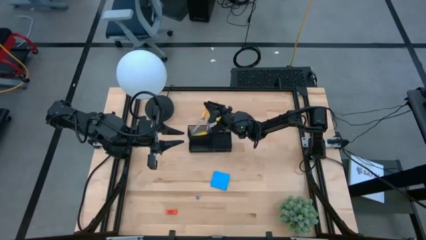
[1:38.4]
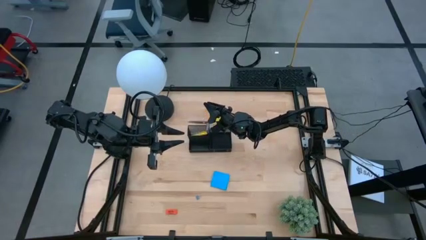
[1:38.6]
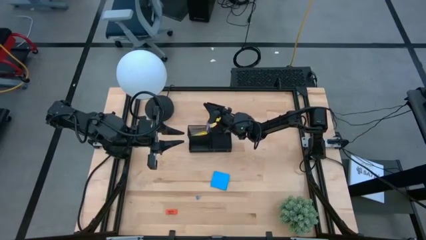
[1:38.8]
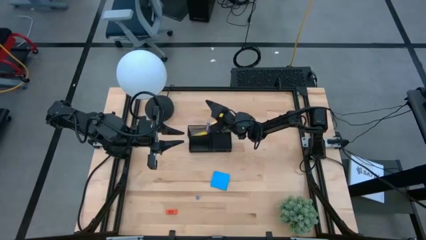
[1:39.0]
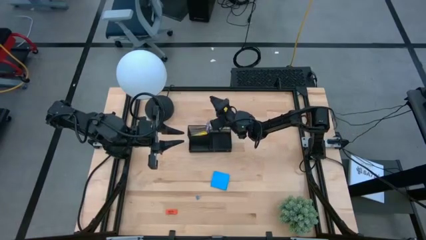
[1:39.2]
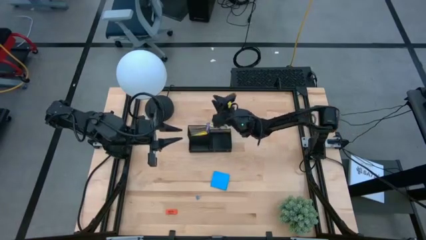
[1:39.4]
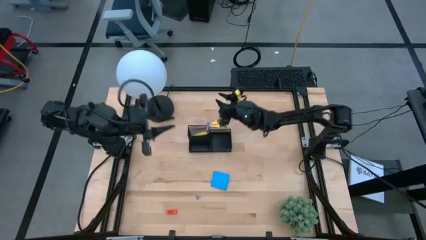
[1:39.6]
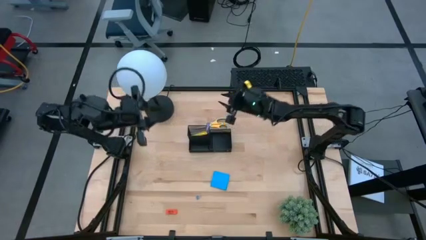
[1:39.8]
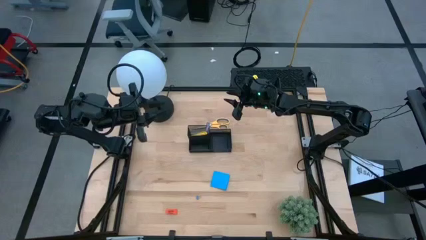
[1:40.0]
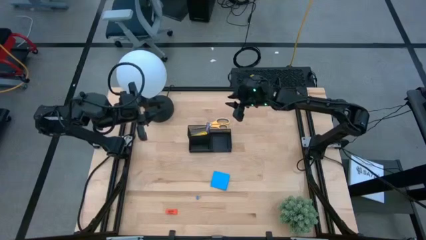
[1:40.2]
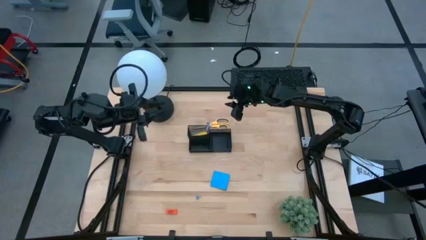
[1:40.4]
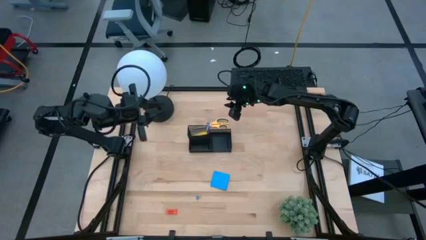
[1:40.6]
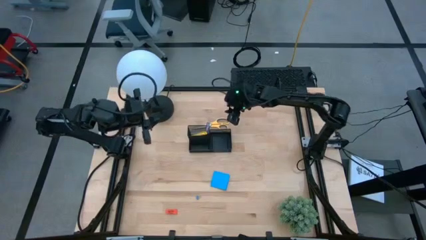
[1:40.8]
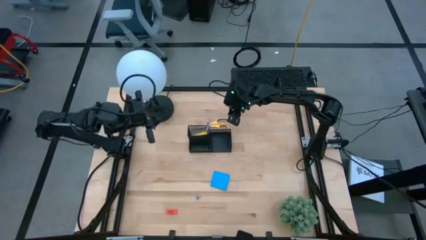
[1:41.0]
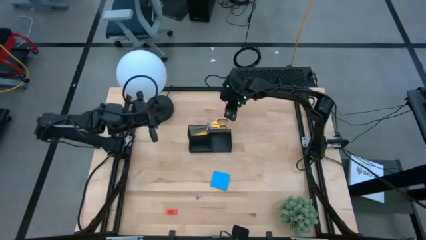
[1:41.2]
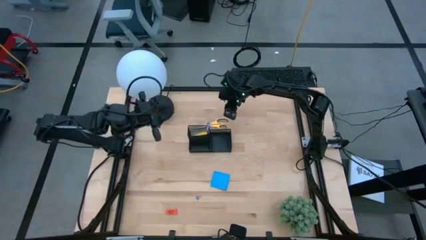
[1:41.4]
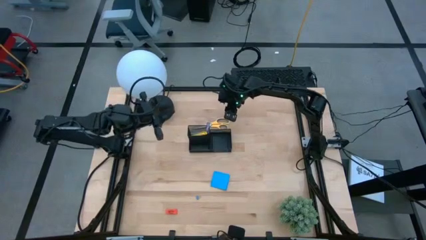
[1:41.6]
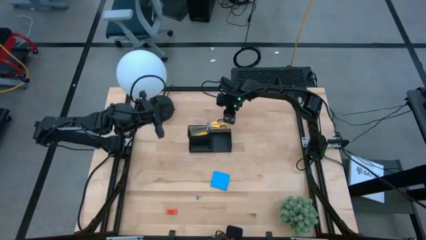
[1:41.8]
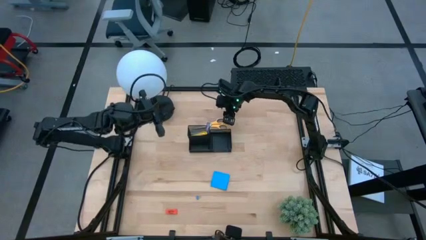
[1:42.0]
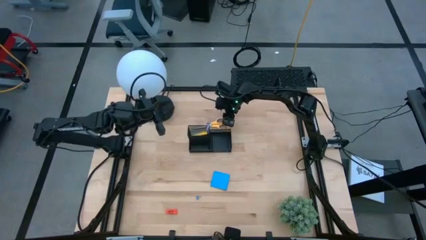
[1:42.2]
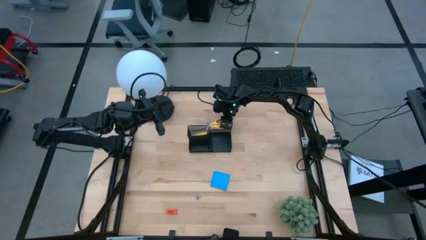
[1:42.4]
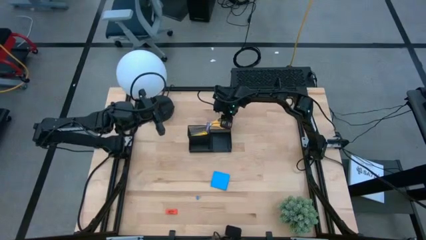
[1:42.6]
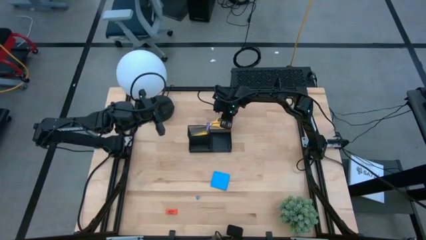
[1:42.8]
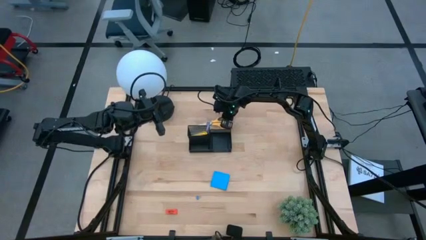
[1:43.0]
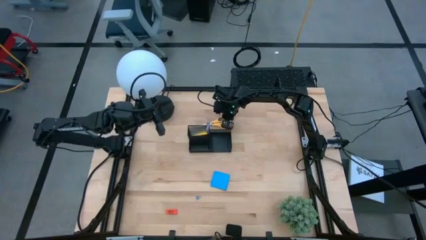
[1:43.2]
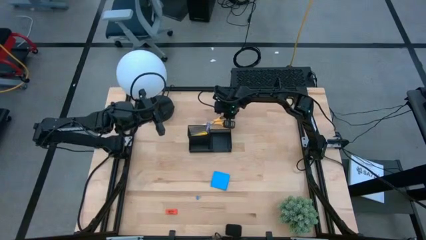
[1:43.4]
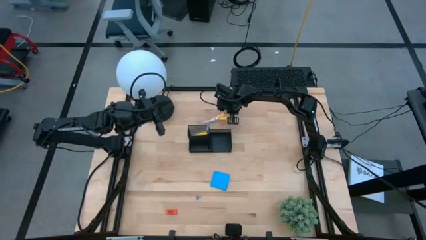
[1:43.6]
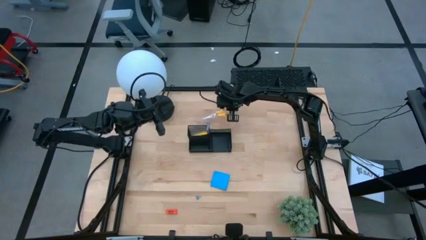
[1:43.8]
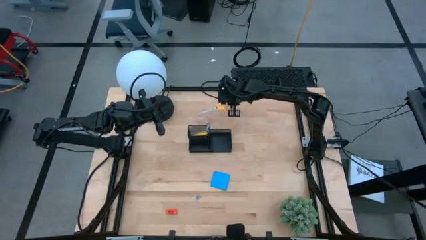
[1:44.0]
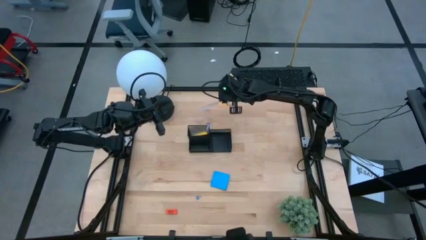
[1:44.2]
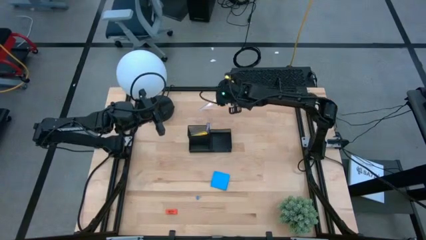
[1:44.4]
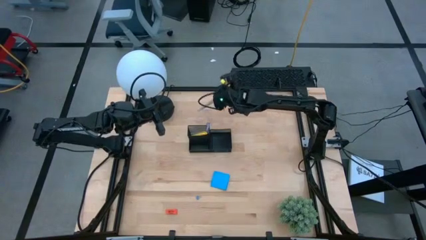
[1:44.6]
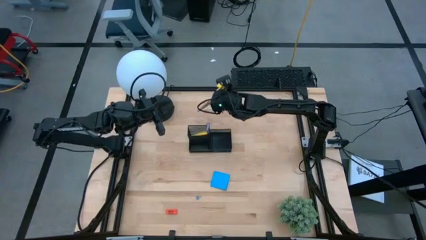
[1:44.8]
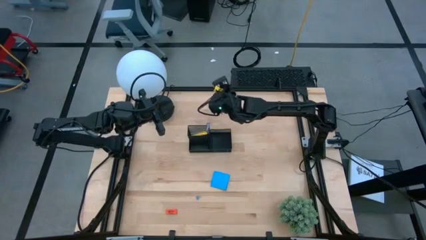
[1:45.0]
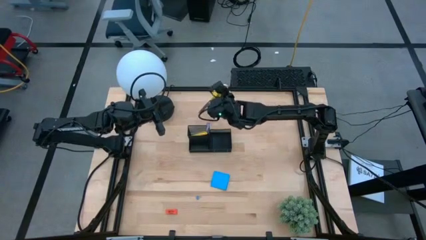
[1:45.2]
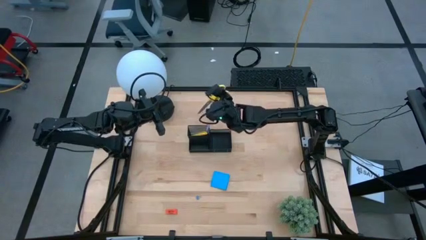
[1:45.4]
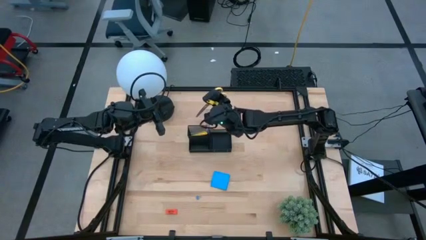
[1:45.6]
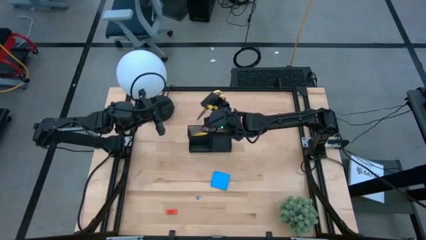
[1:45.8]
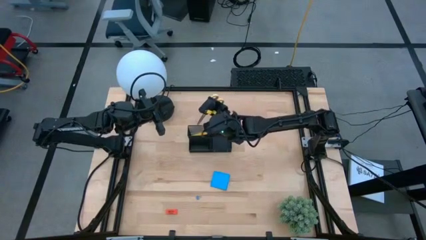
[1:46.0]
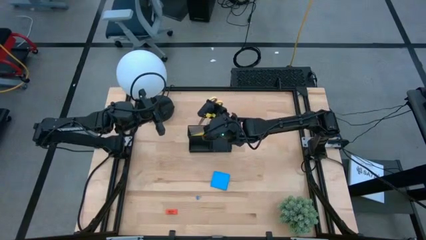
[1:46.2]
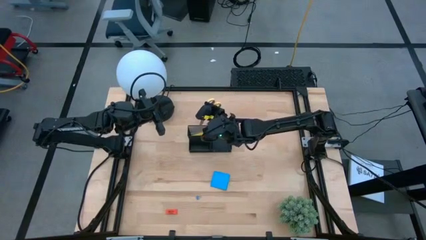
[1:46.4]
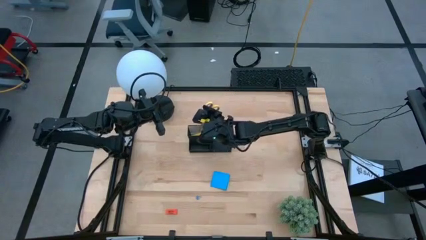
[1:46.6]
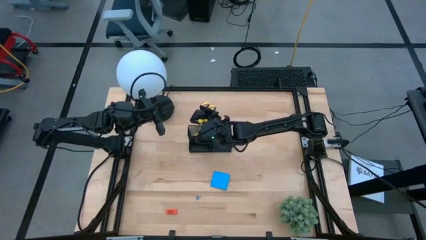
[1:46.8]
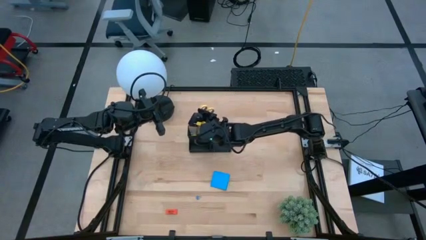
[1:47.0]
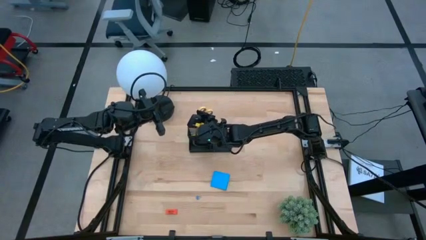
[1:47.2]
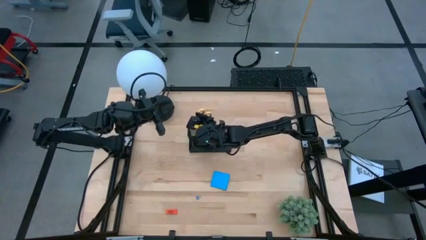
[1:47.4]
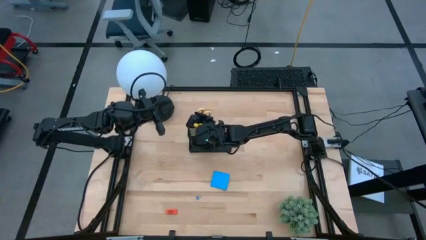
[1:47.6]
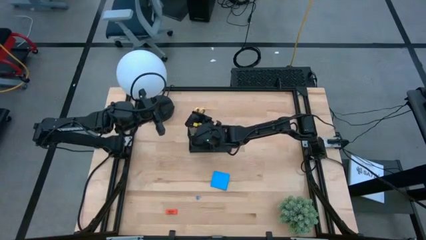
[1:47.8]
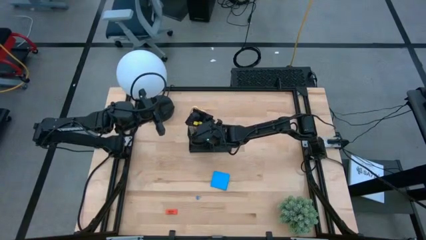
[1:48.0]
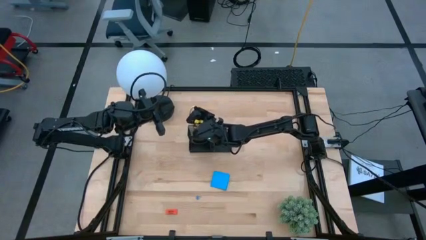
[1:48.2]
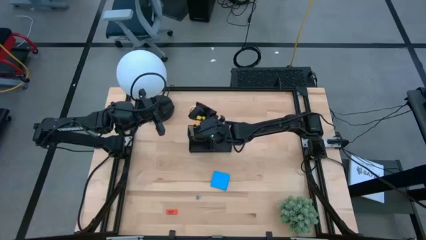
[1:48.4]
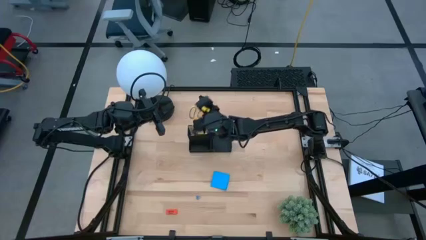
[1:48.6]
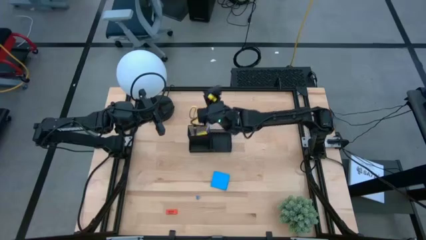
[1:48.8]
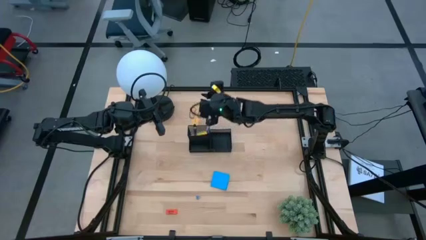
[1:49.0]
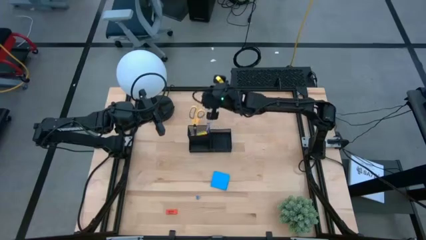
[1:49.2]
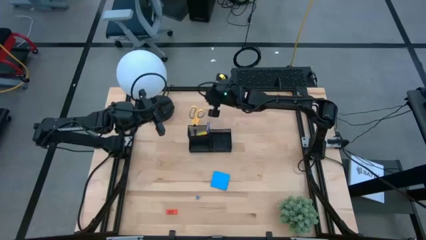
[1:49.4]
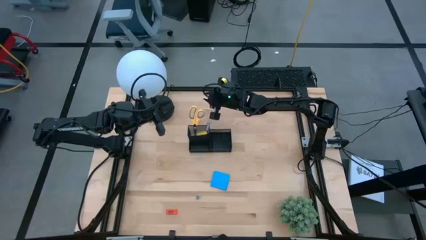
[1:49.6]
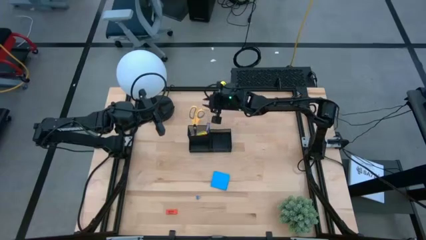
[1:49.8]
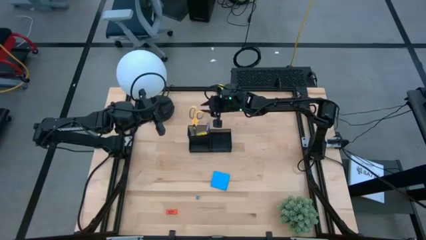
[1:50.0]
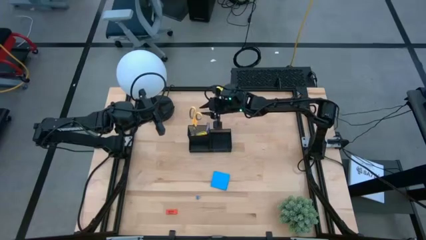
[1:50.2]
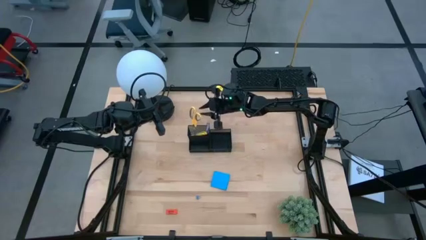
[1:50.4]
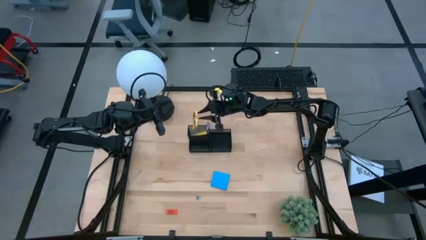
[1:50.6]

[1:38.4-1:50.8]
Task: Pick and place office supplies into organizer
Put the yellow scissors into the black mesh desk organizer
